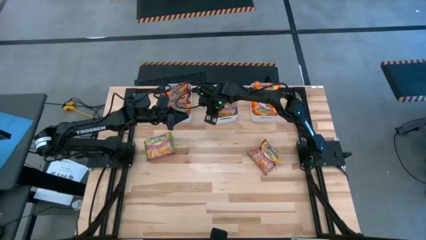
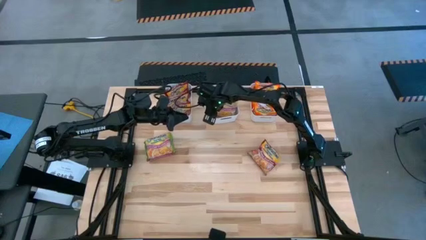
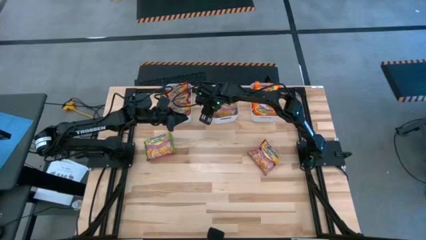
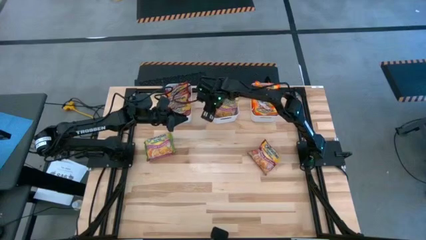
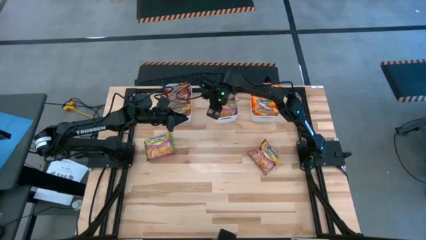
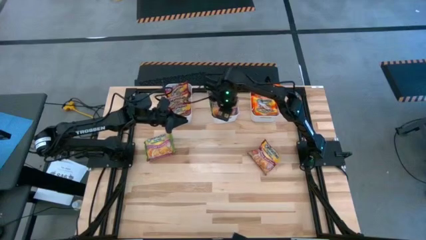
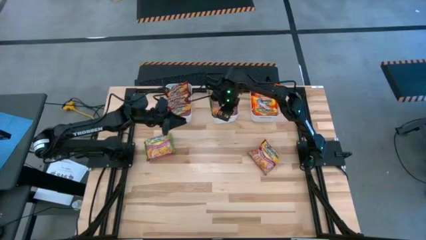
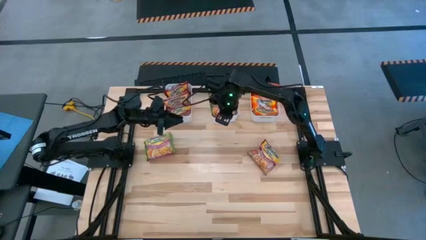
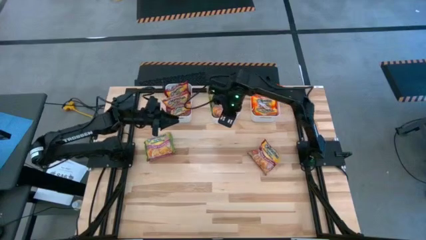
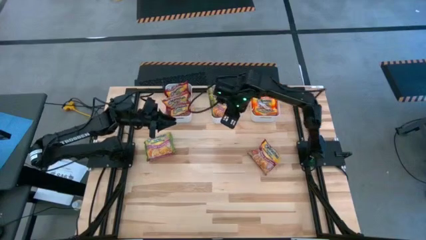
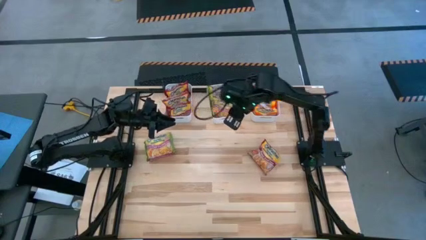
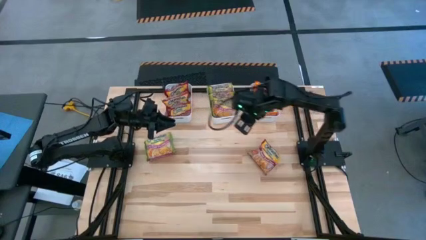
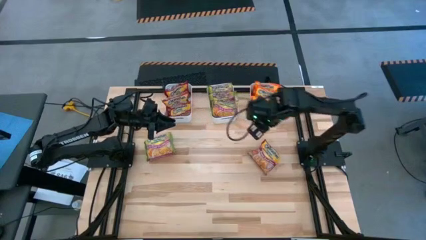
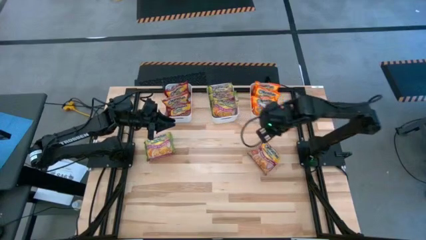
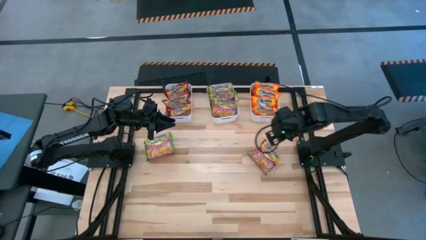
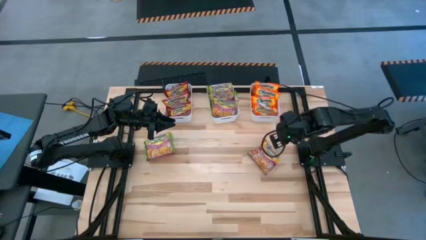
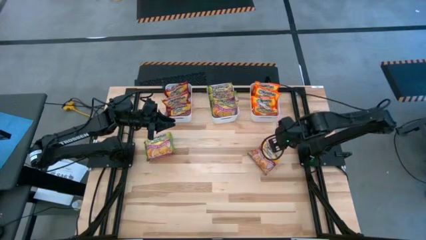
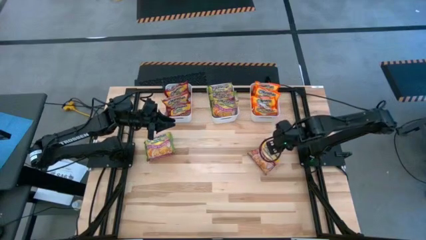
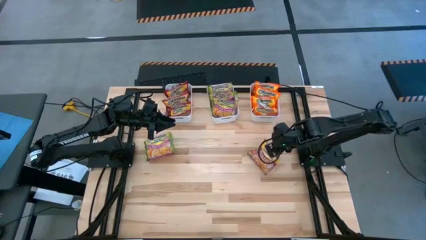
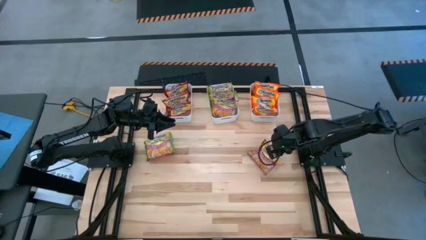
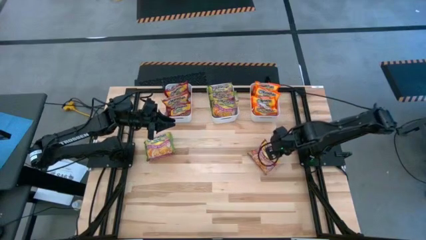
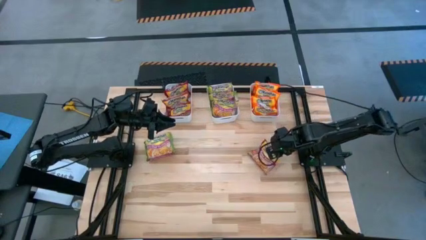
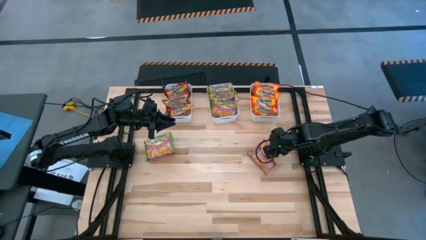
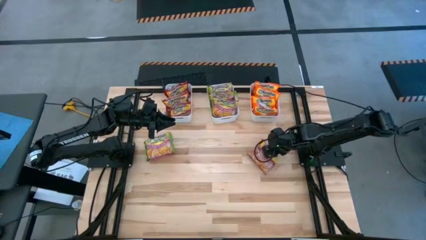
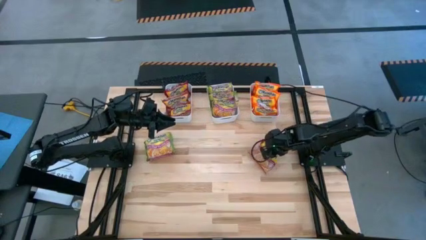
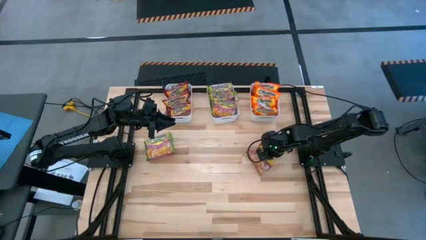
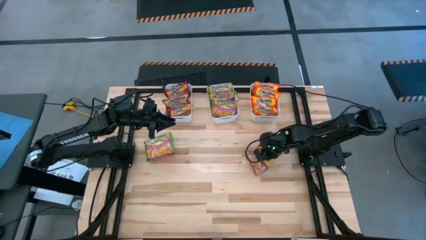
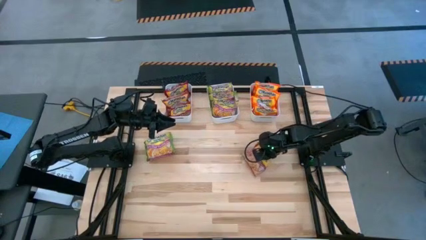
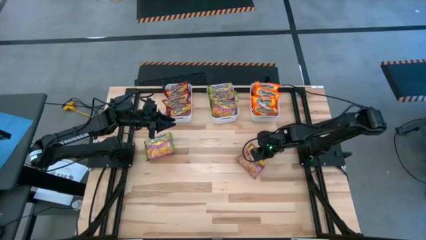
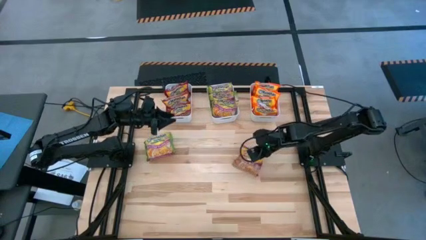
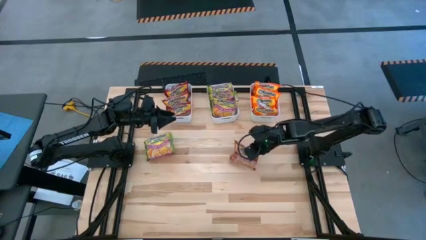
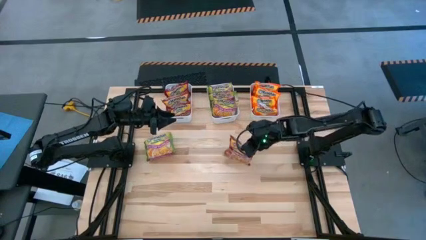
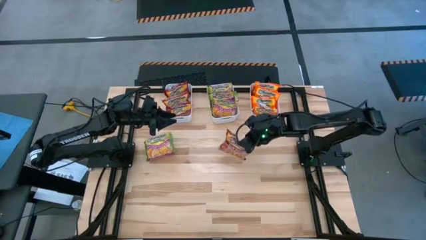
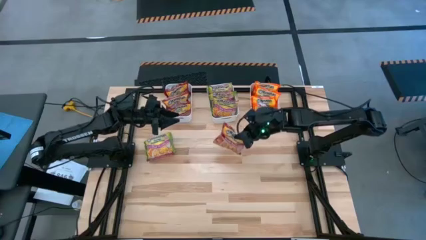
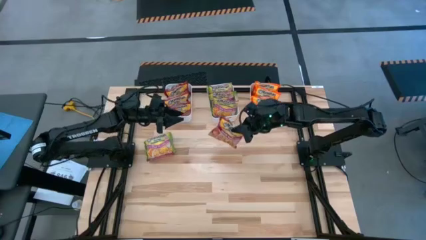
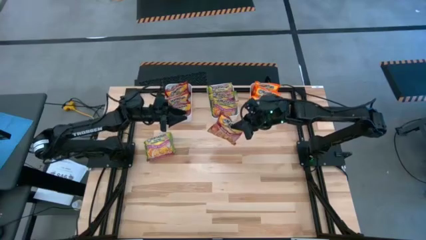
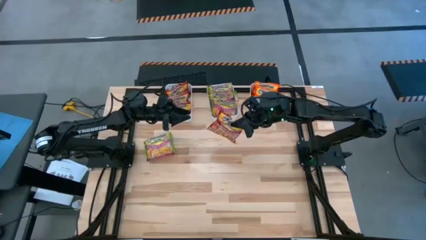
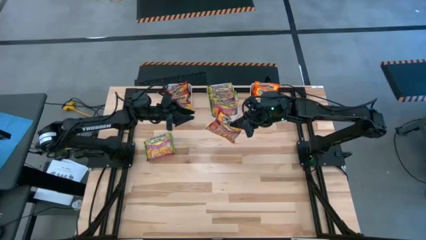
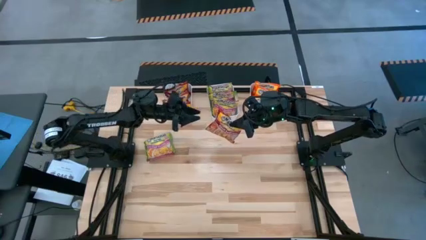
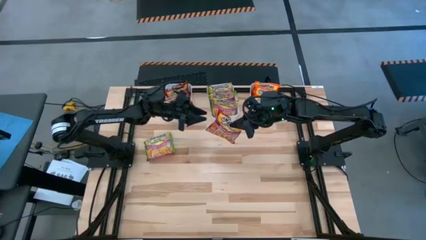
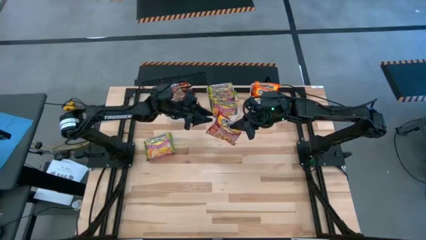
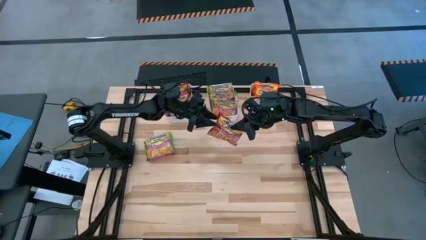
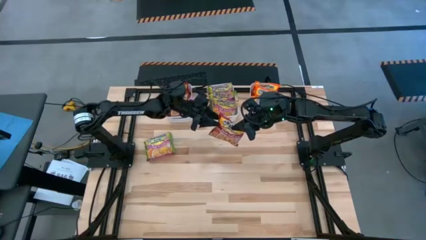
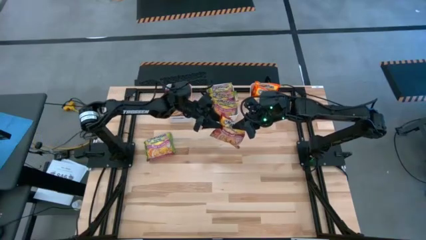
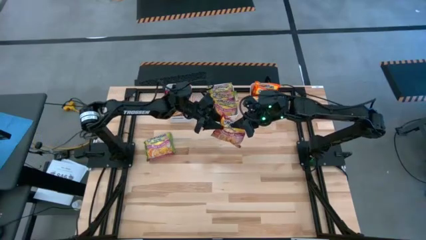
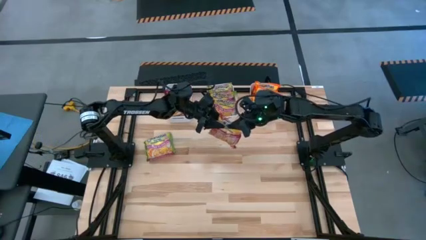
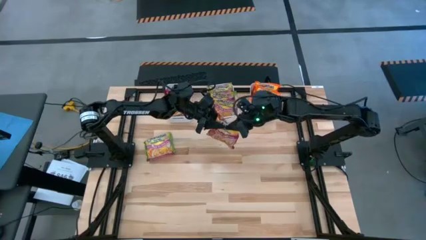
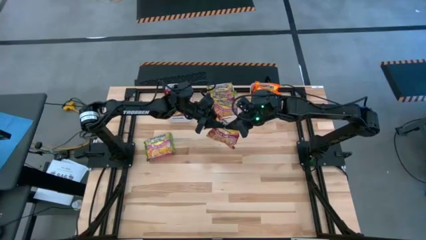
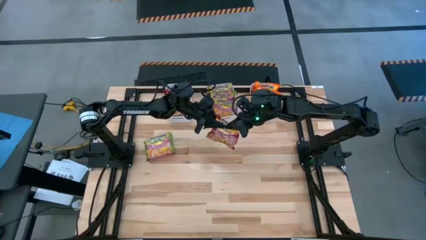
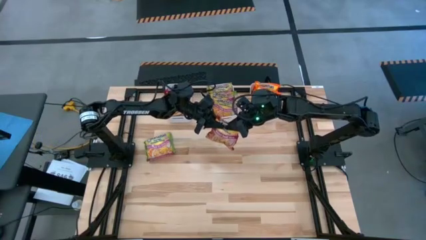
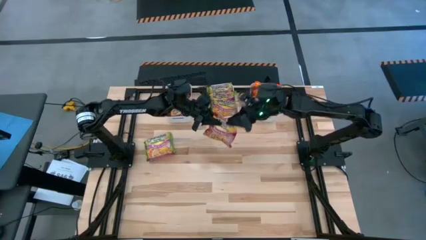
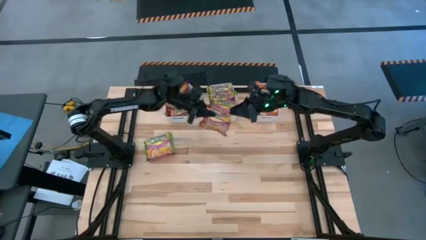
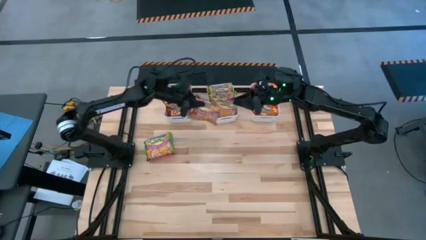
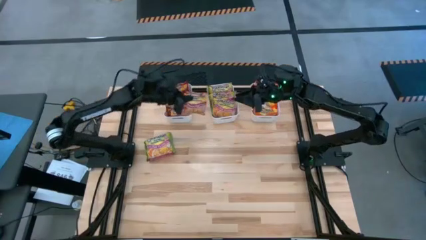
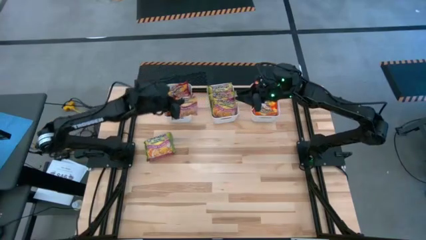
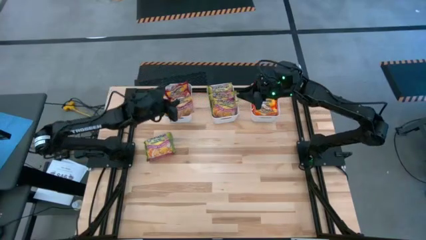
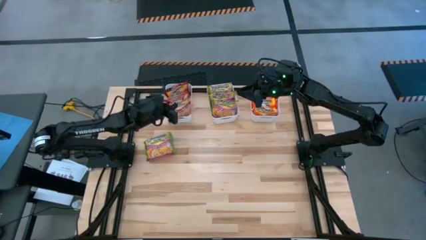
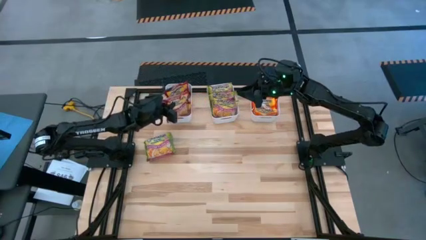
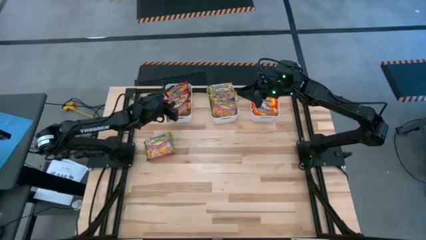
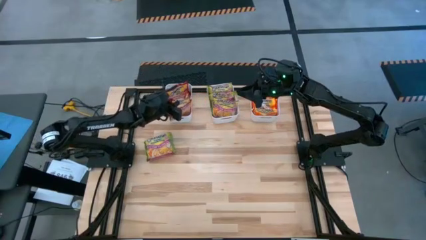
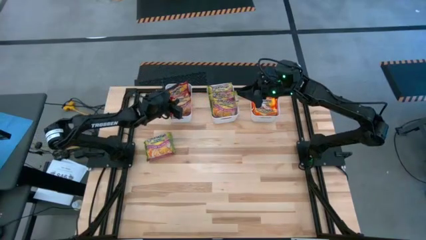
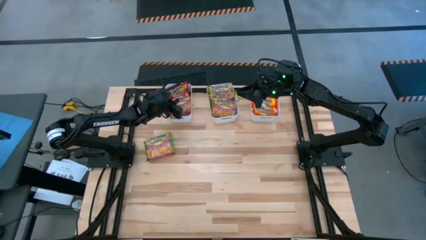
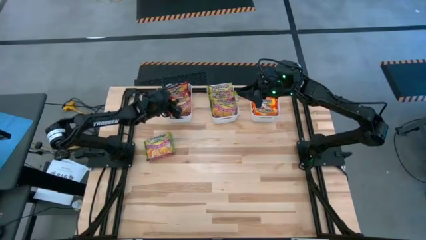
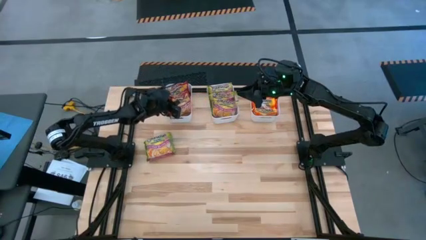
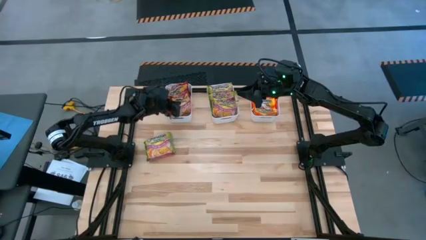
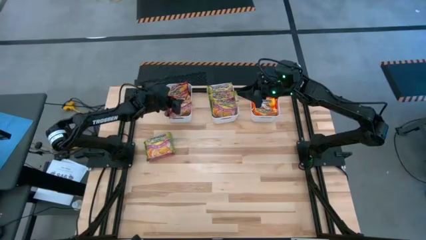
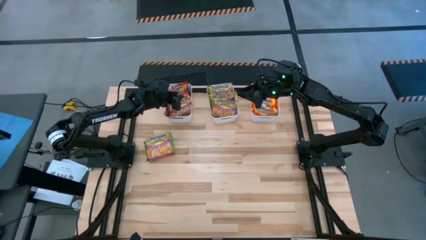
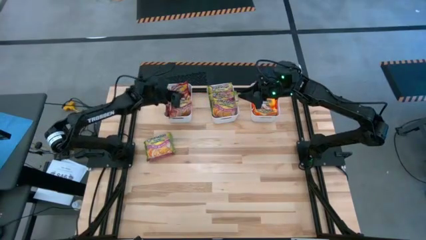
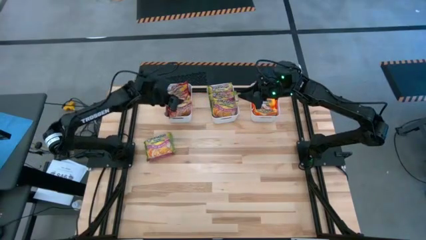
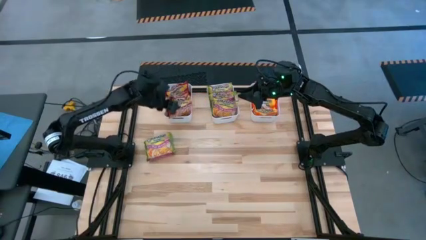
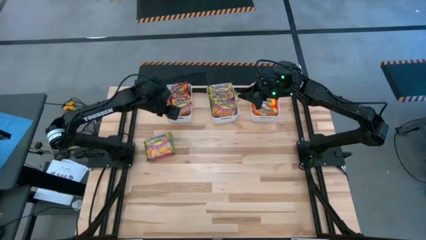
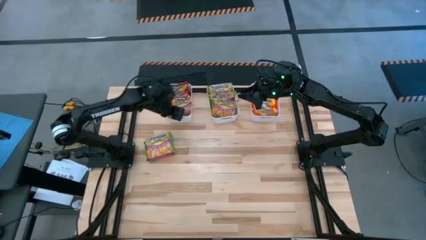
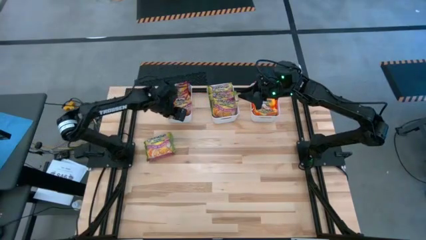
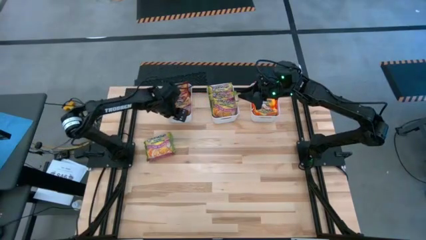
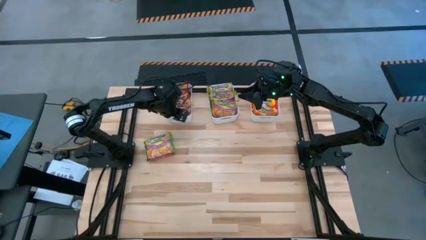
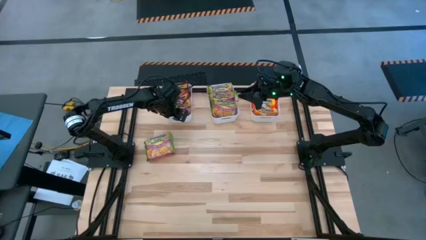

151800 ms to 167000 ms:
Task: Sort Maruchan noodles
Put the red noodle pack into the left white bin
